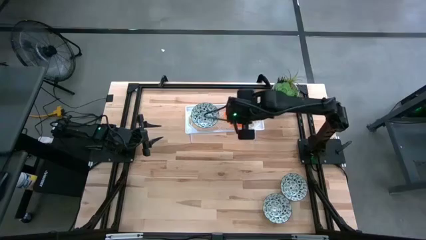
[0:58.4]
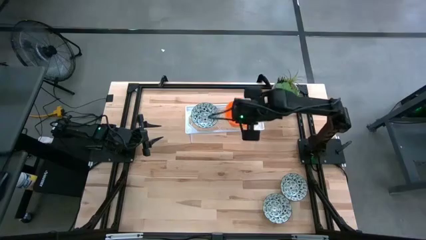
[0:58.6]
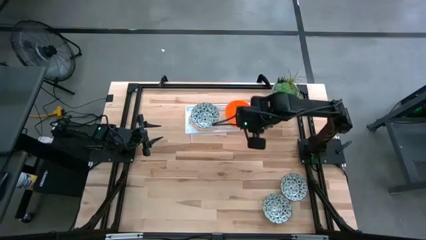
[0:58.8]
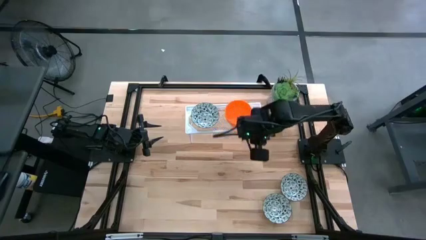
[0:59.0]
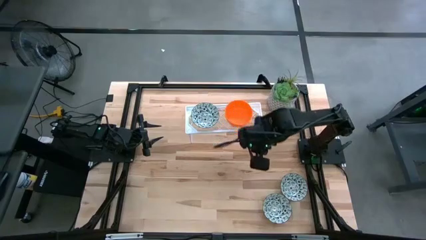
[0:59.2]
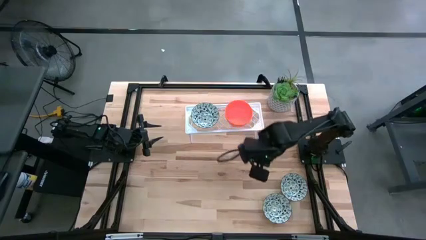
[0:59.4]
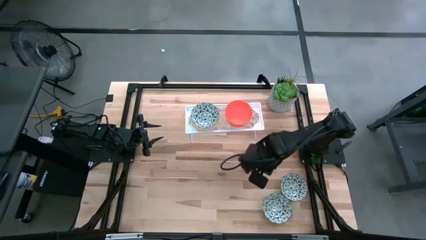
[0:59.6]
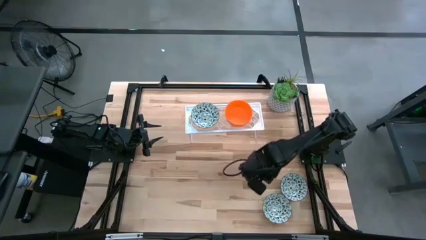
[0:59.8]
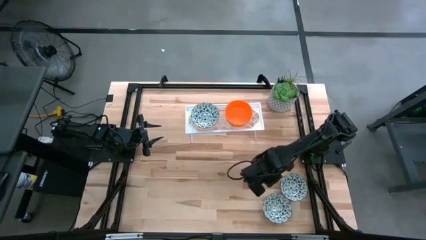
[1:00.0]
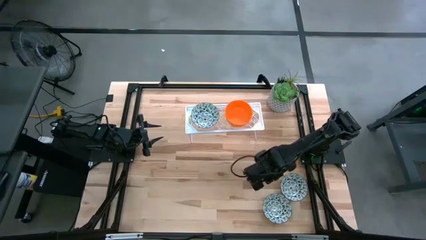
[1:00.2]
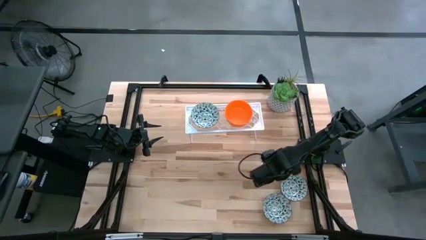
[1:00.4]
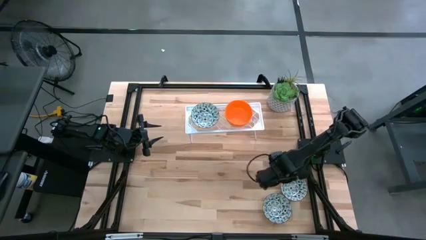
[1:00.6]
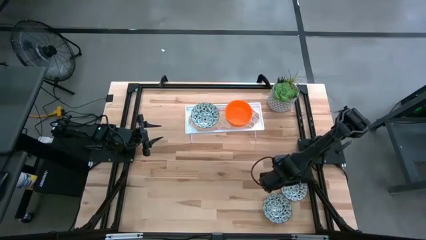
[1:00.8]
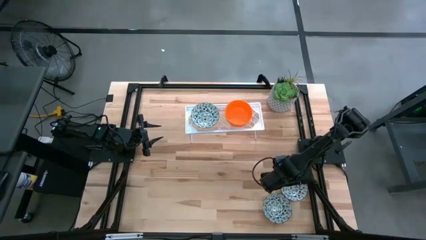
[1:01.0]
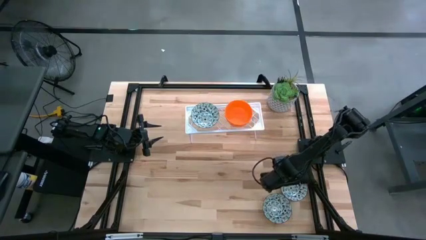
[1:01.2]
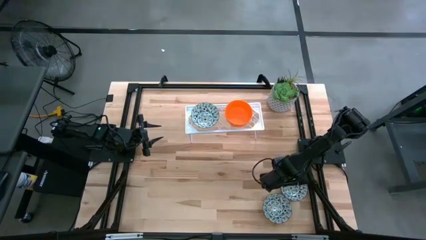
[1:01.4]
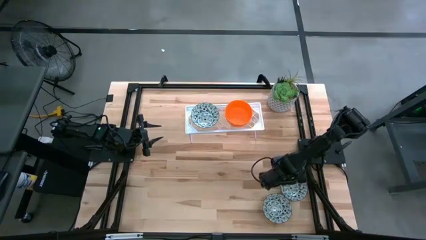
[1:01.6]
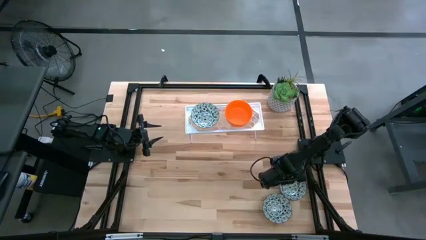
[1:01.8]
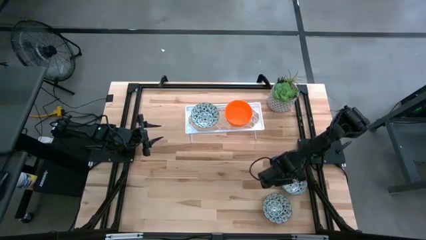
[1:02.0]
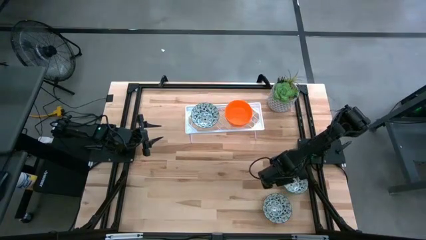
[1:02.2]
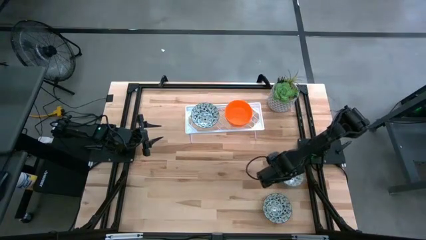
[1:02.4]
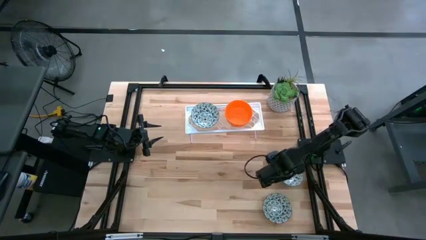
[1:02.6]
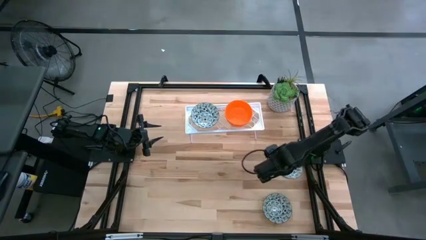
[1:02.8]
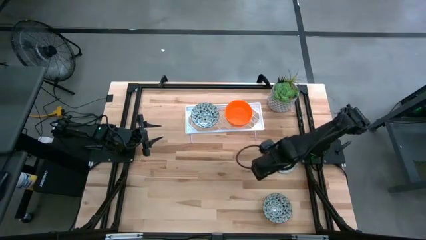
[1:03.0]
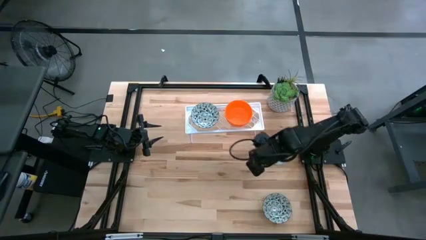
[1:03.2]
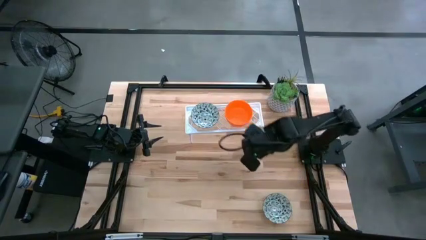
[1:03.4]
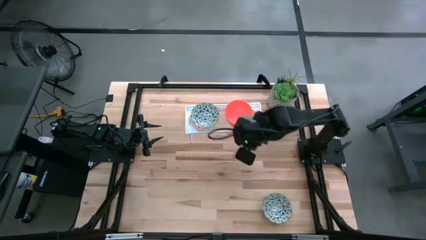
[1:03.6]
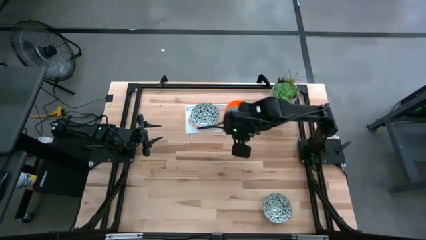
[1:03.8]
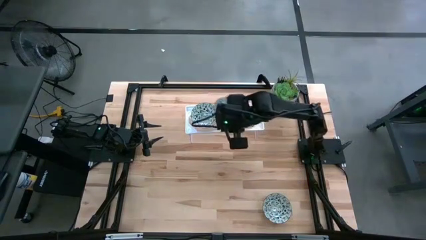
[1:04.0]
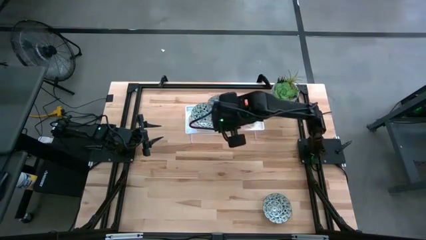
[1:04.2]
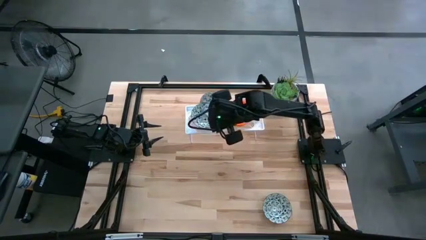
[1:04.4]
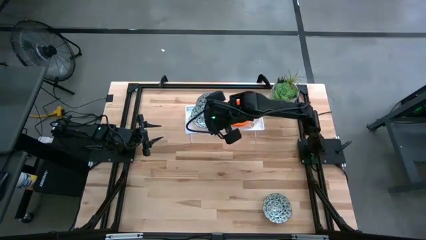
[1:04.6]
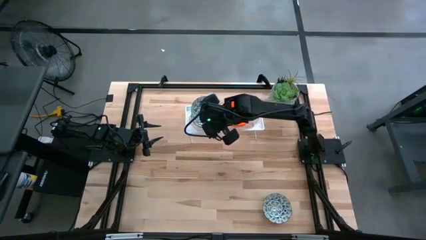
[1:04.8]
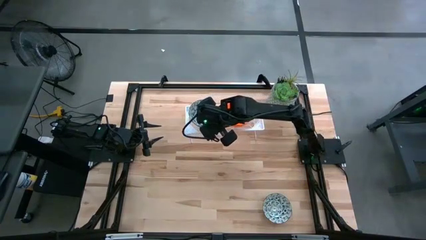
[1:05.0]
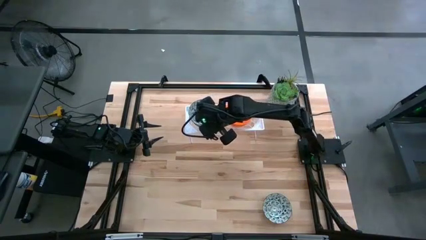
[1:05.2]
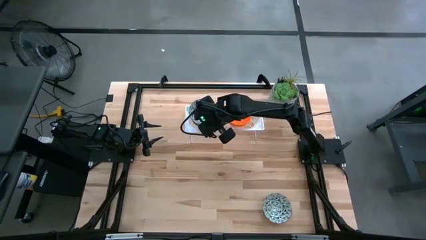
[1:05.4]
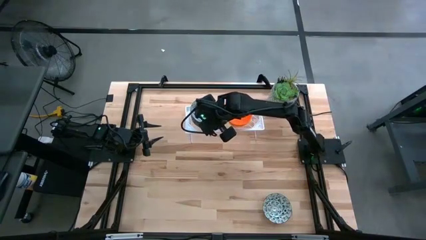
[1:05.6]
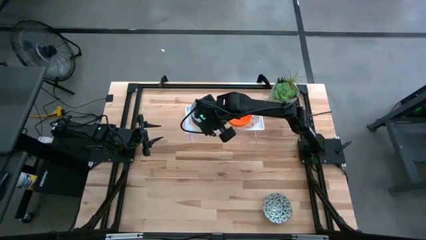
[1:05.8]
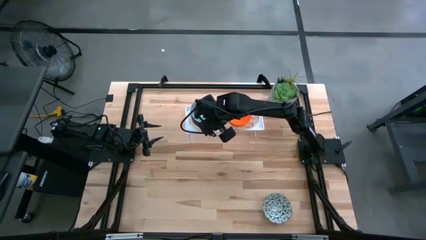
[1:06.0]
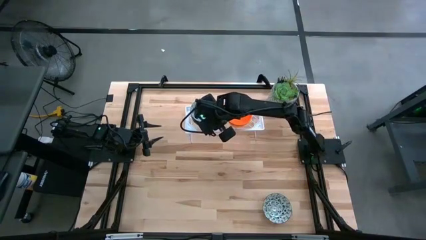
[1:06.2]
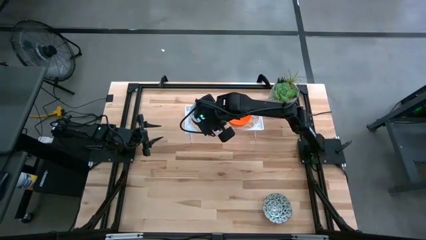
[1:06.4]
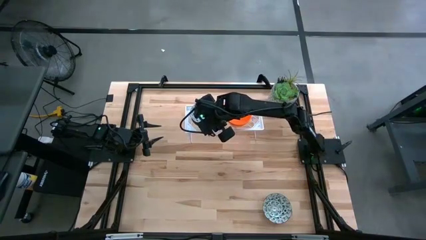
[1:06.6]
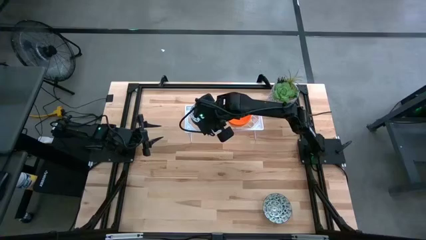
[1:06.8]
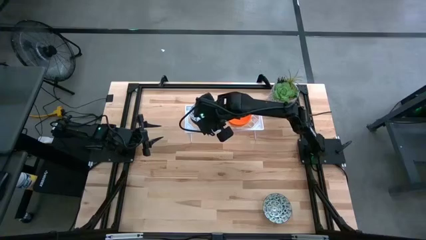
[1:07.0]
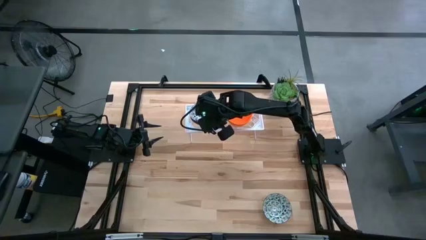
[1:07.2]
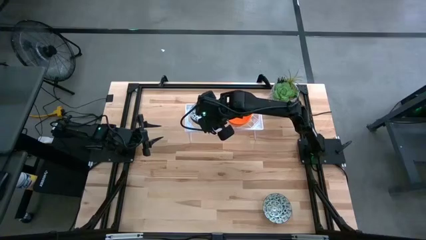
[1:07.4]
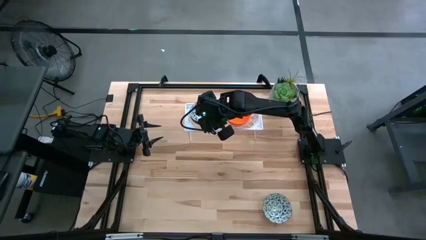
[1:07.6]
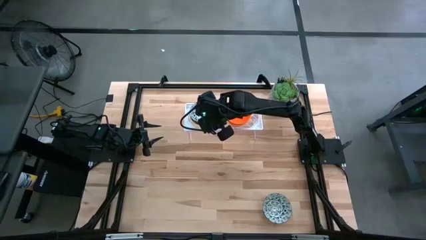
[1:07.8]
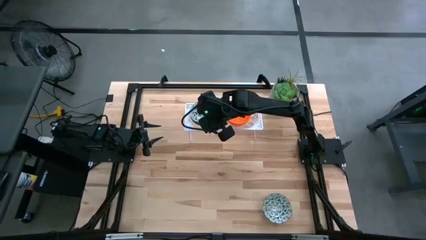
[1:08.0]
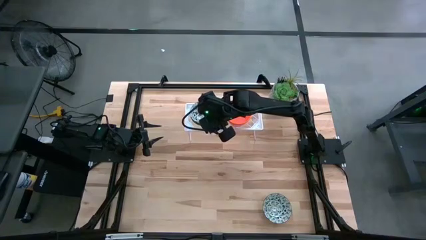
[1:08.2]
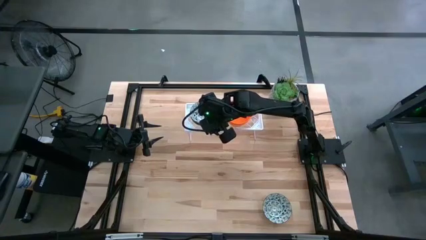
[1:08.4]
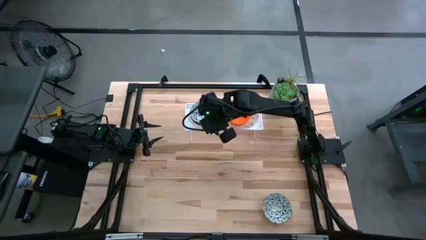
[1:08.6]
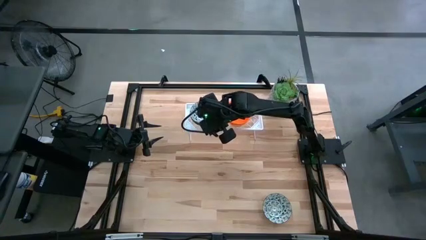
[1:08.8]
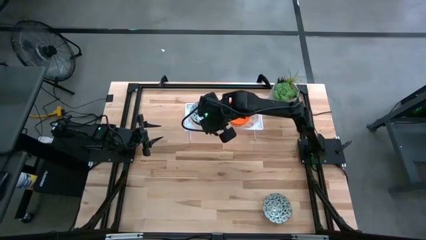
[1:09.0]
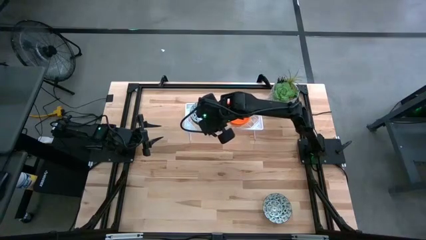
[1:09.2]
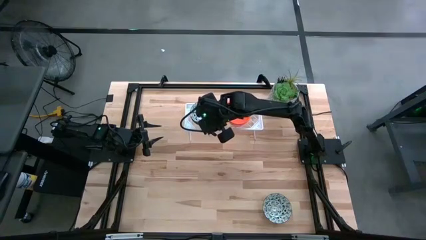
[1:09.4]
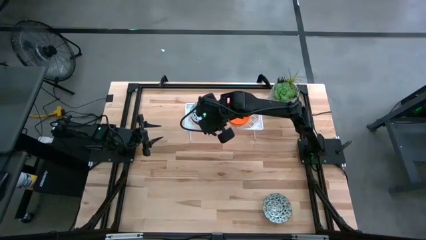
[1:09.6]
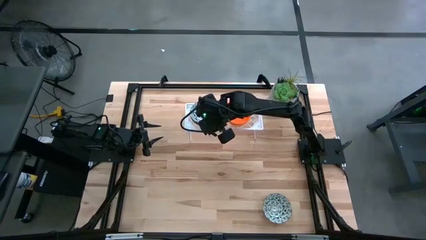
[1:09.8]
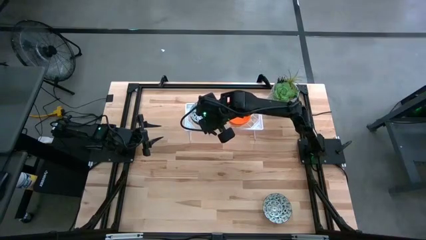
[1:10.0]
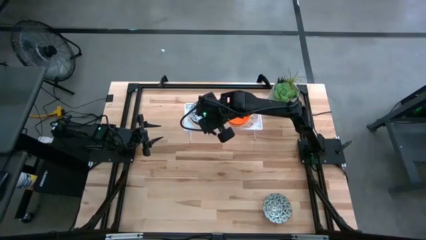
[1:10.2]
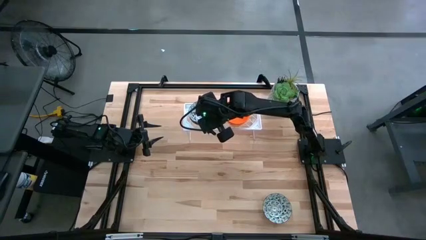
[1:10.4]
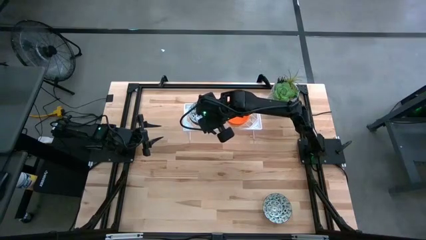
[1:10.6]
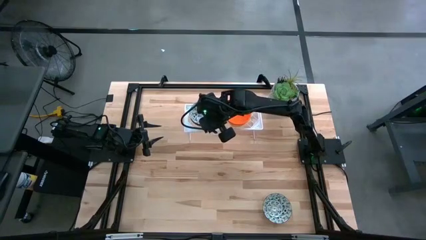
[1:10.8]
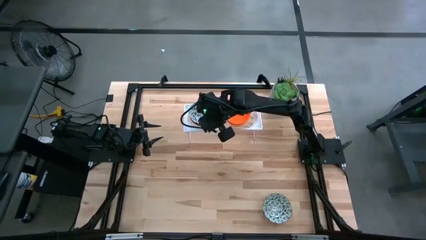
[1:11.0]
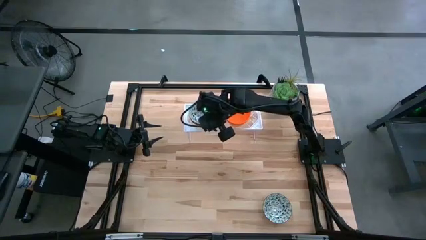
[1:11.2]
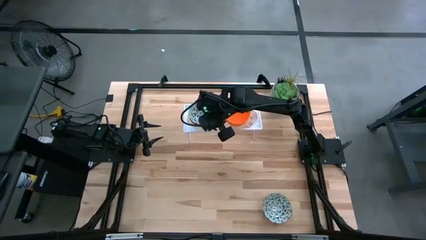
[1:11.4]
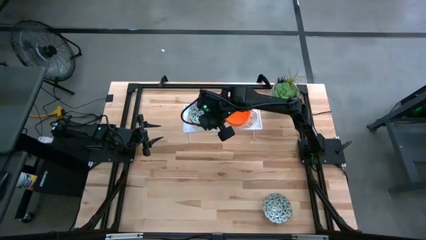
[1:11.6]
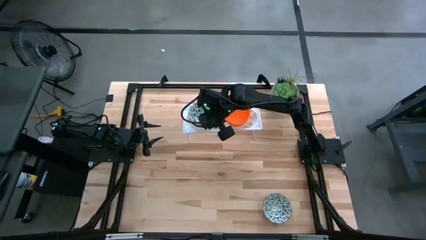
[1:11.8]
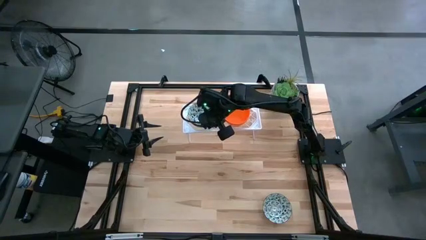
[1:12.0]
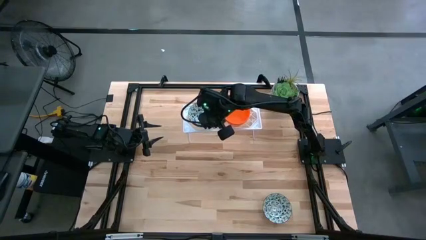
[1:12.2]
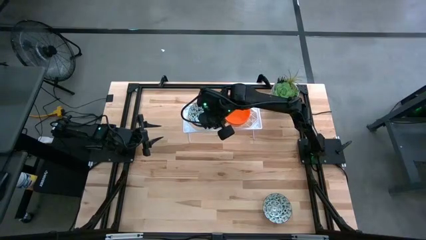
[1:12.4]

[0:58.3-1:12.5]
Task: Pick & Place Mini bowls
Stack the top blue patterned bowl on top of the other blue patterned bowl on the shelf
